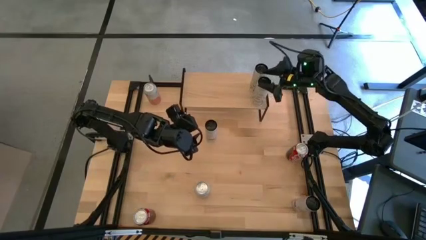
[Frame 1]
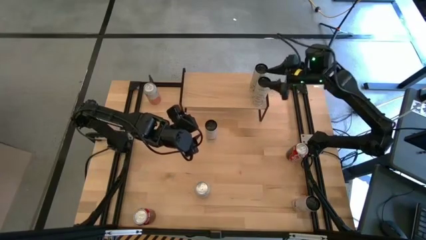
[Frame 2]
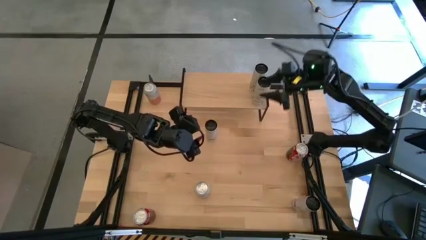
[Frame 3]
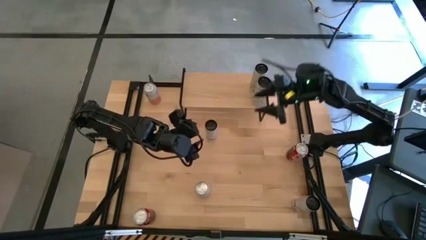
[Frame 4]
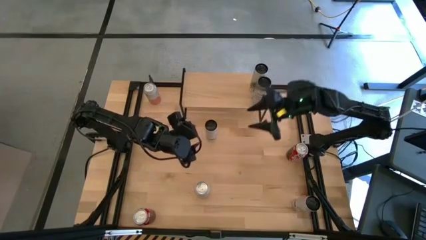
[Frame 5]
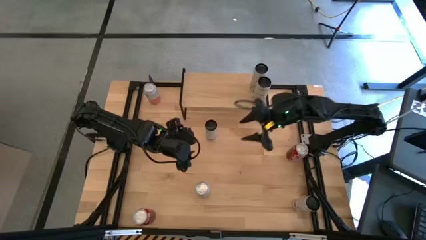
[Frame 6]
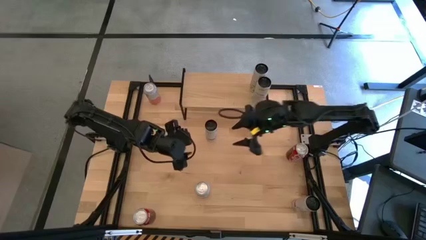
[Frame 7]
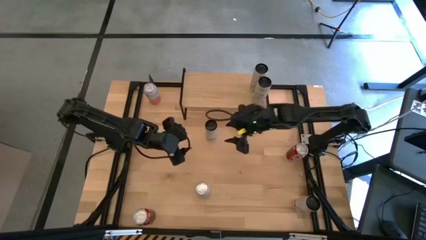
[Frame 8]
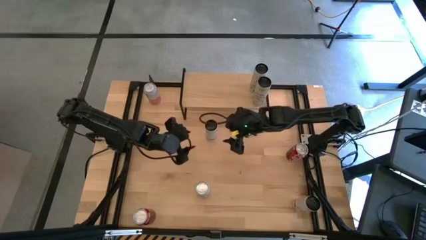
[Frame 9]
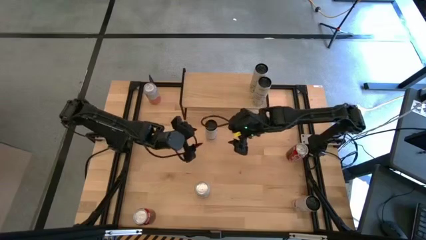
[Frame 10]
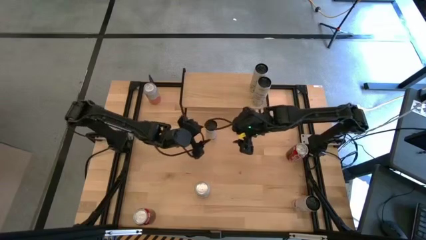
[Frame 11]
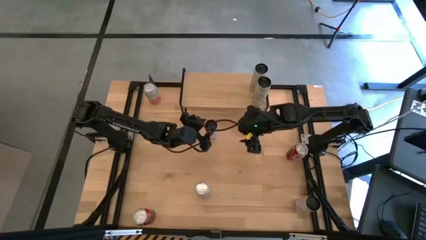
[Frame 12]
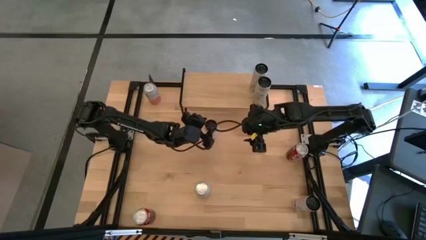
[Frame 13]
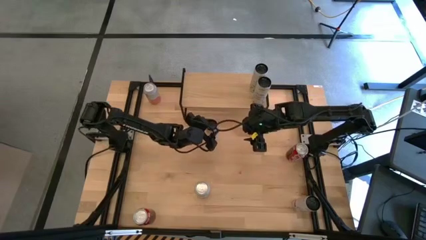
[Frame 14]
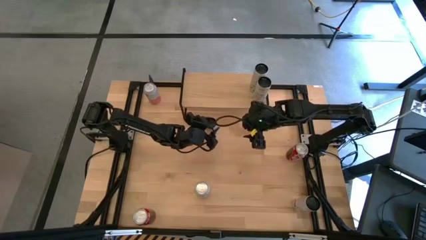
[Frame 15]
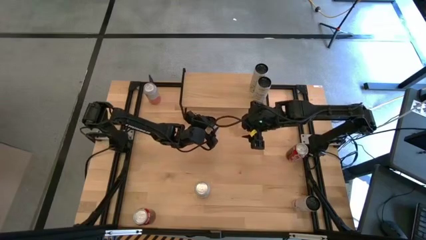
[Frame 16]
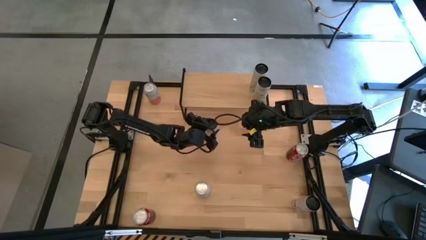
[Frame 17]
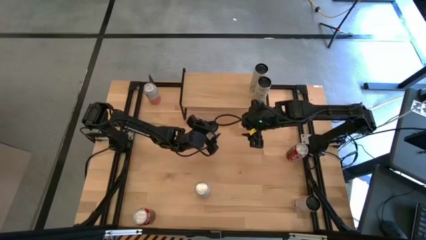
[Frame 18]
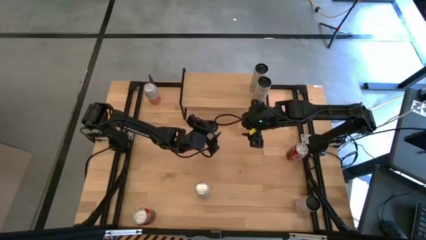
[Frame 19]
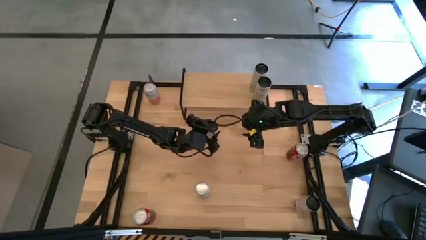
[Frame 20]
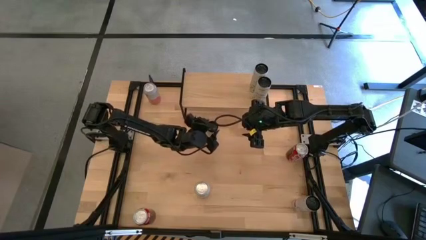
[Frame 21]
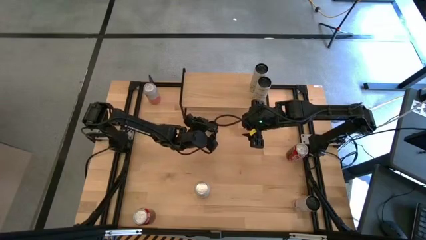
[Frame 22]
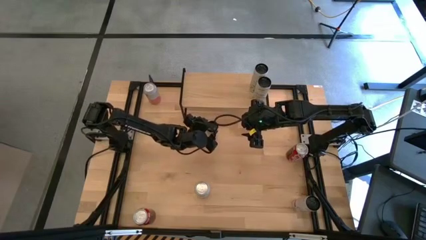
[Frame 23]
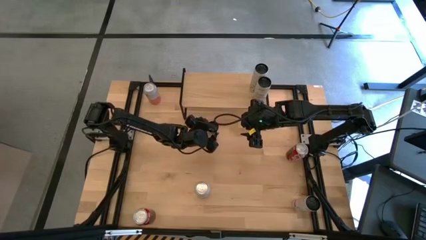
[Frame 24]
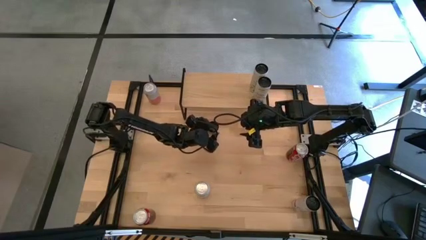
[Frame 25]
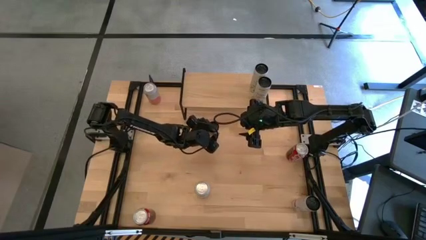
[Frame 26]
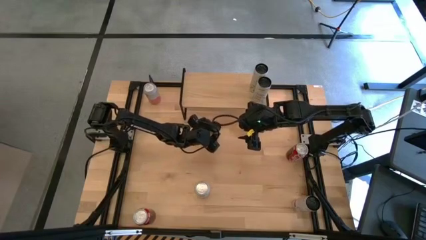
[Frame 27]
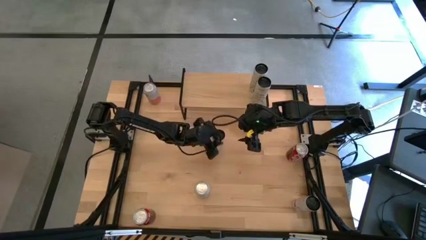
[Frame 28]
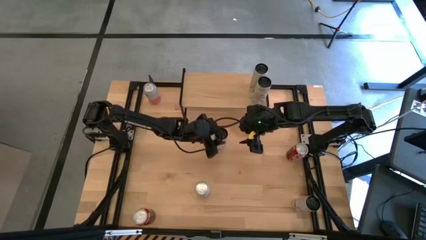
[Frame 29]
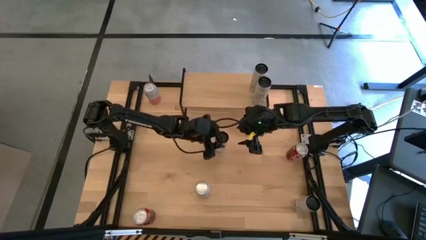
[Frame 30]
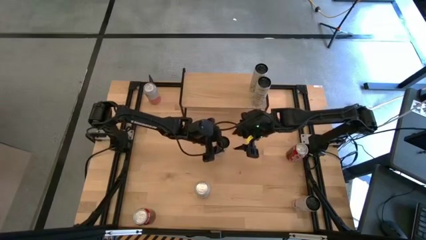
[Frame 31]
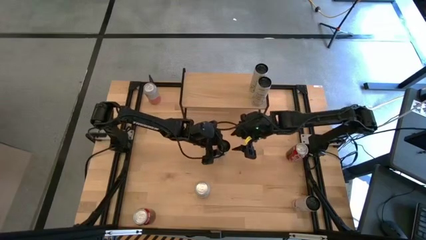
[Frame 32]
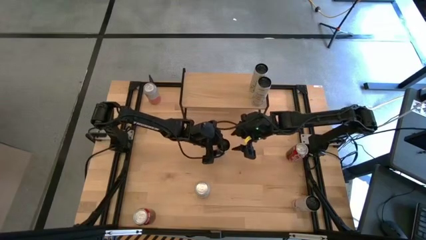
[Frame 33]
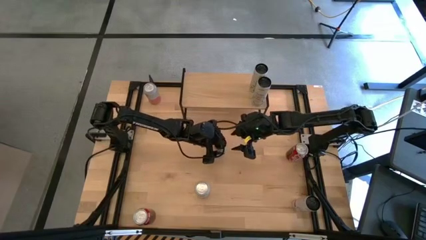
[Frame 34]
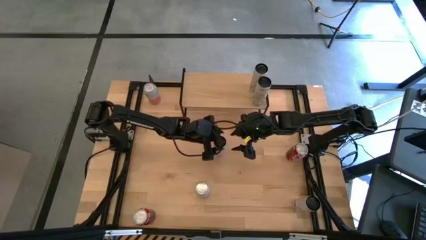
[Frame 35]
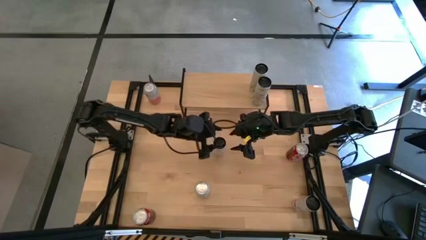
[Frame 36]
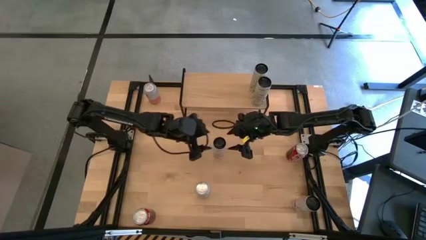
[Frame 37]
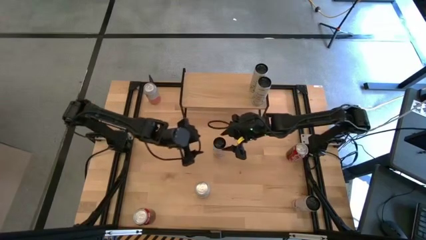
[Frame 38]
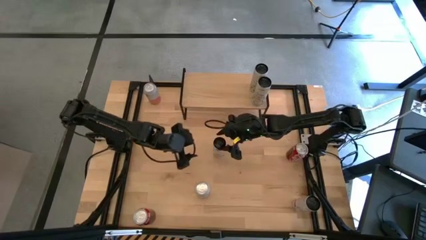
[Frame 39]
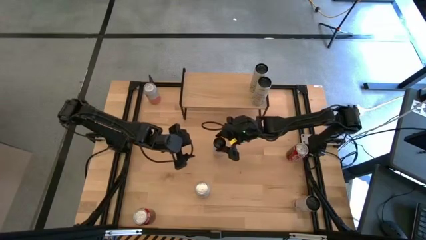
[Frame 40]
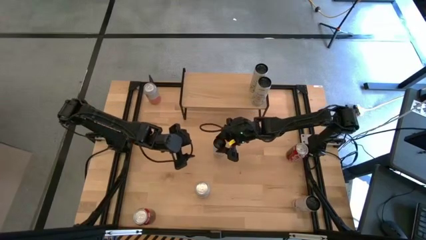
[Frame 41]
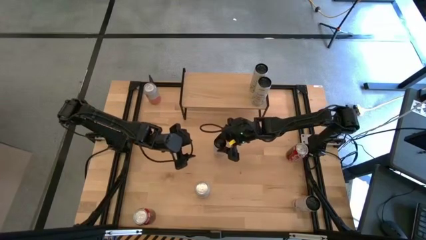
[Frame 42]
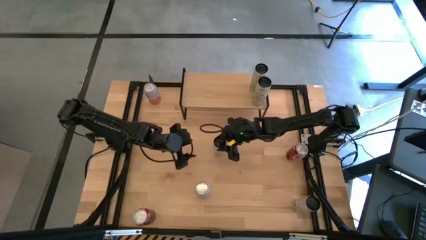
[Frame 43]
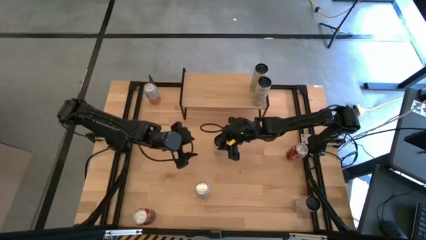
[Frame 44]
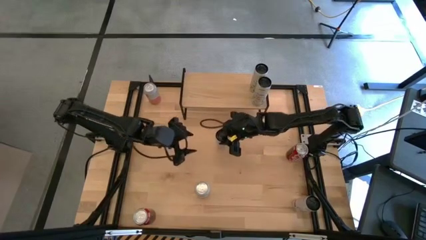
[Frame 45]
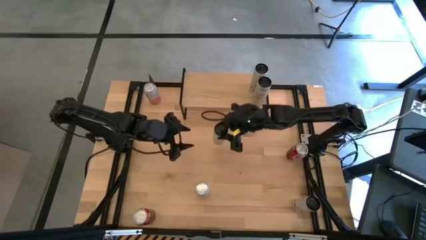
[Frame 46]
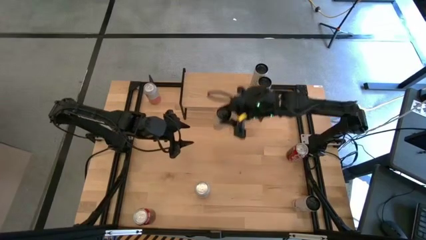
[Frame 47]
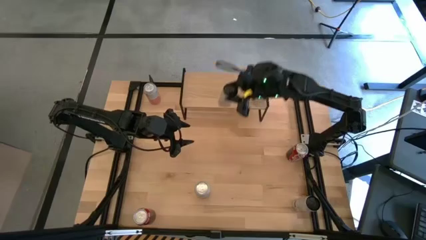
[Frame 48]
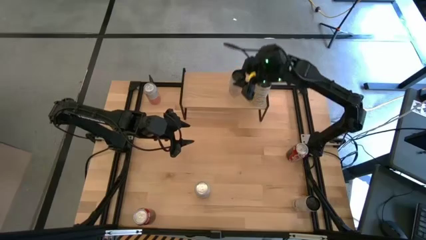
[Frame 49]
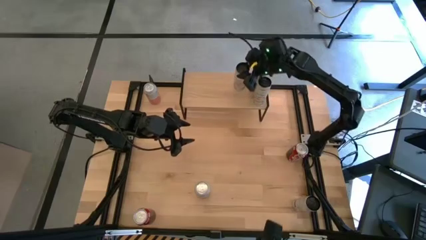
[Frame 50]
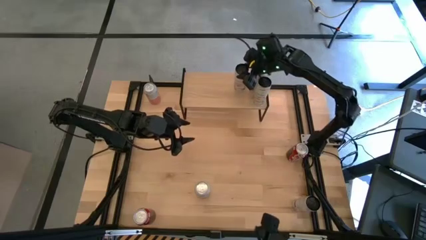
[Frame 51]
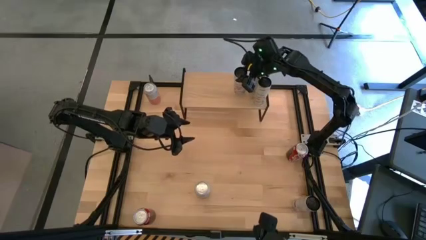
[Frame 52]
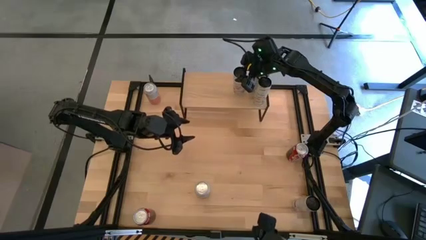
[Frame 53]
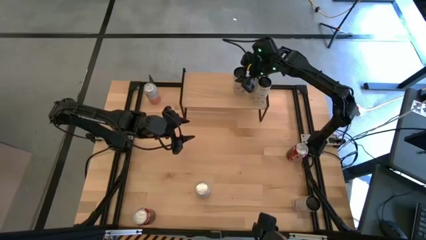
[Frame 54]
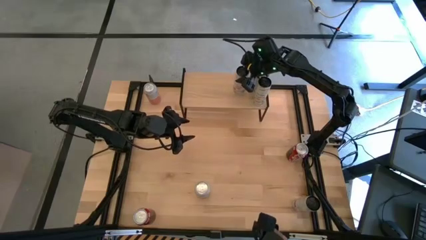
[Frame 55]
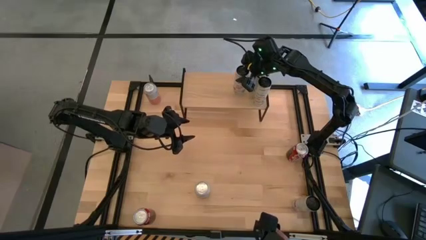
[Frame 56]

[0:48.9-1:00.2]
Task: Place canned beverage on shelf
Put the top white and pink soda can on the shelf

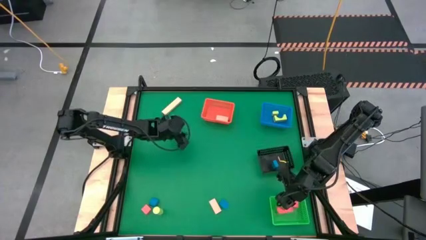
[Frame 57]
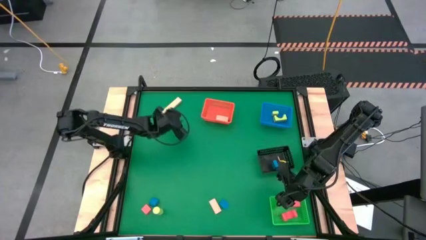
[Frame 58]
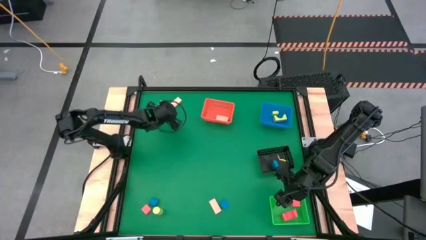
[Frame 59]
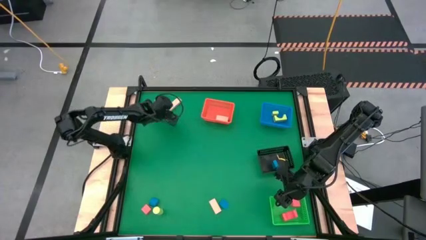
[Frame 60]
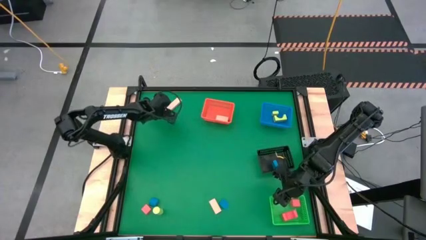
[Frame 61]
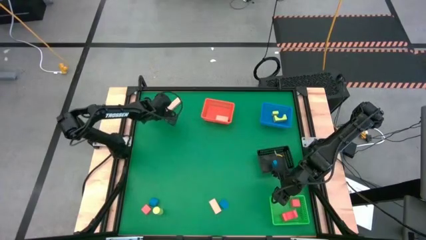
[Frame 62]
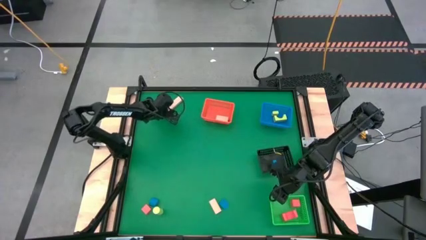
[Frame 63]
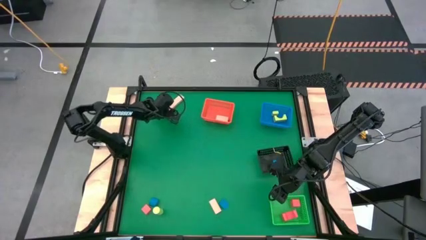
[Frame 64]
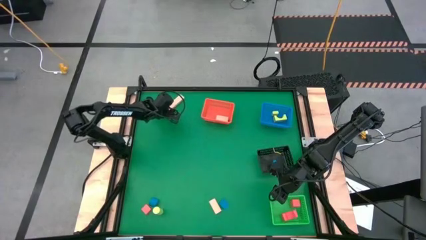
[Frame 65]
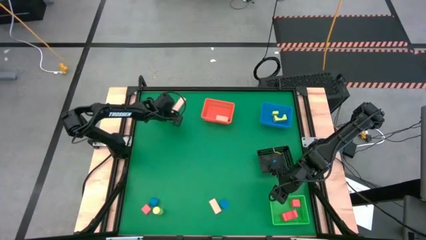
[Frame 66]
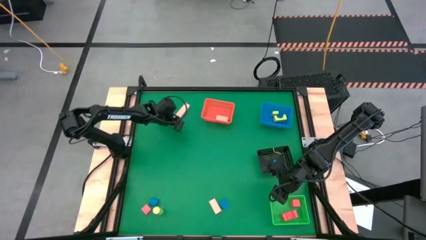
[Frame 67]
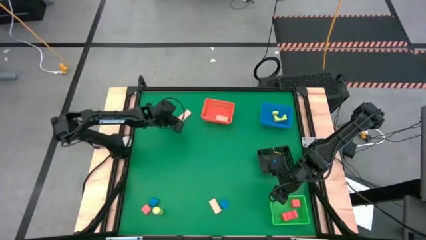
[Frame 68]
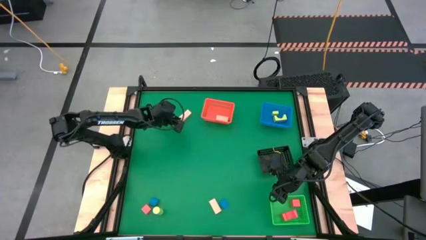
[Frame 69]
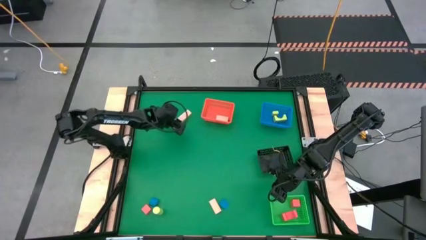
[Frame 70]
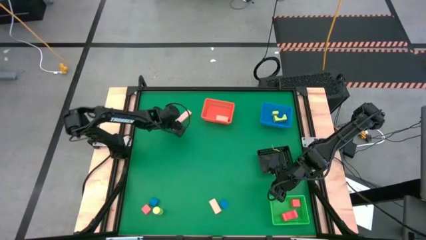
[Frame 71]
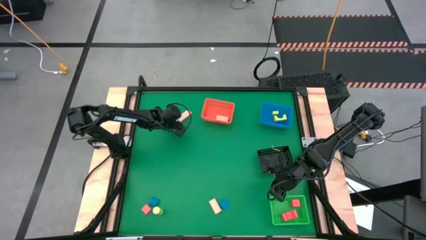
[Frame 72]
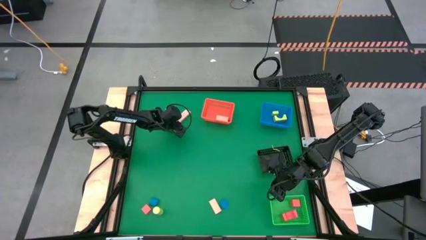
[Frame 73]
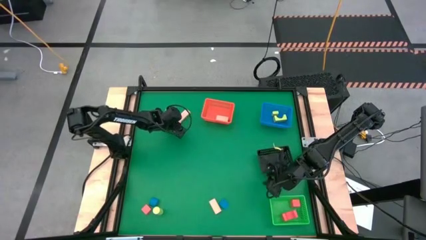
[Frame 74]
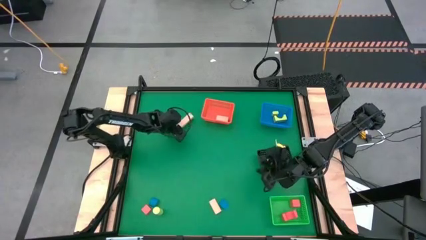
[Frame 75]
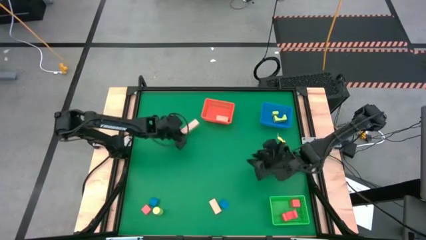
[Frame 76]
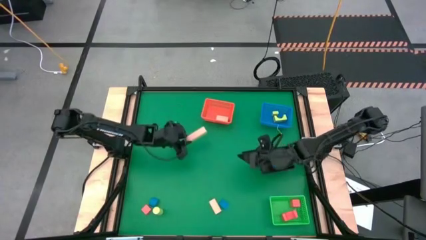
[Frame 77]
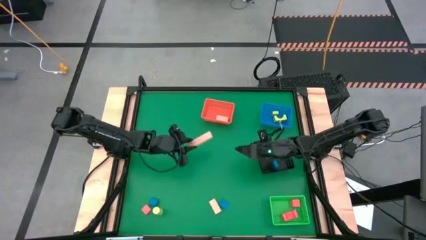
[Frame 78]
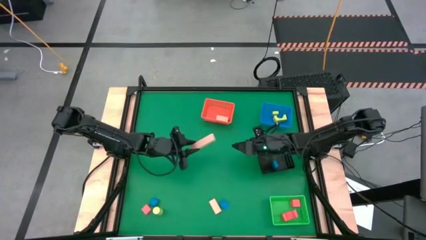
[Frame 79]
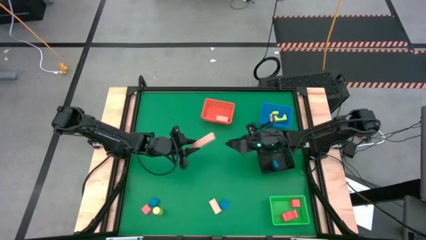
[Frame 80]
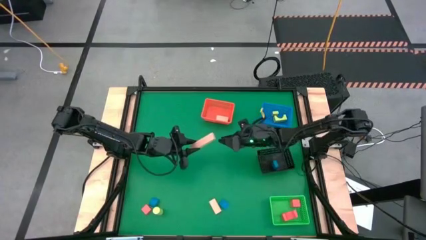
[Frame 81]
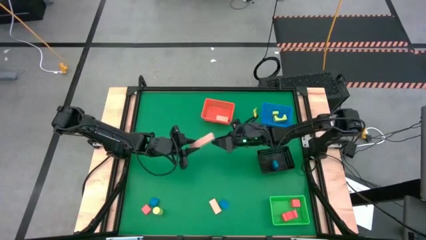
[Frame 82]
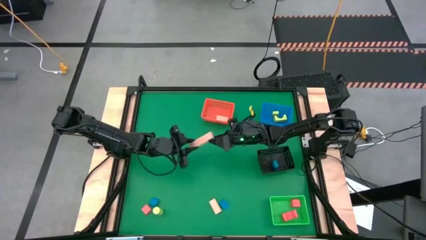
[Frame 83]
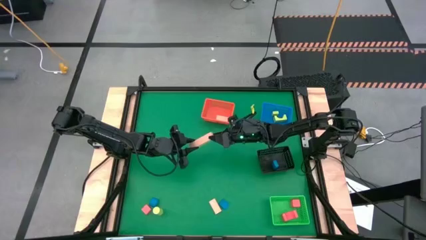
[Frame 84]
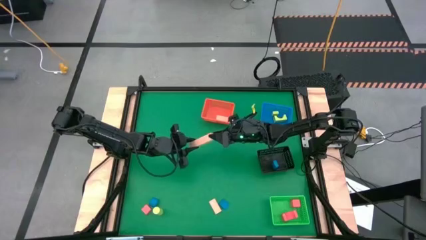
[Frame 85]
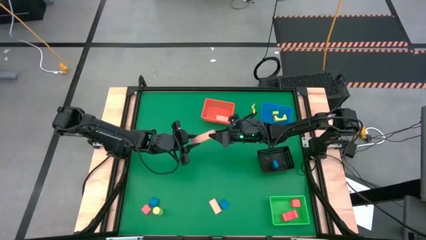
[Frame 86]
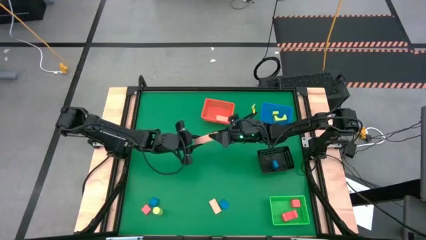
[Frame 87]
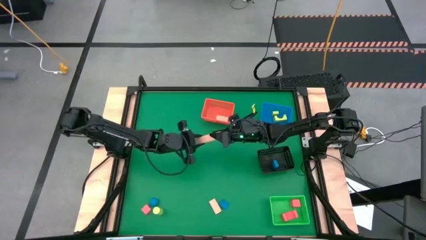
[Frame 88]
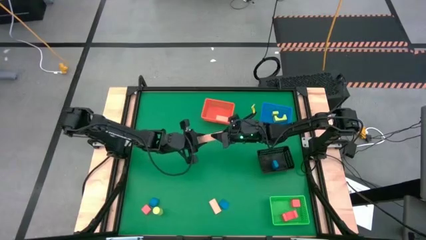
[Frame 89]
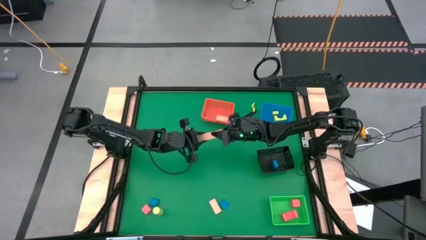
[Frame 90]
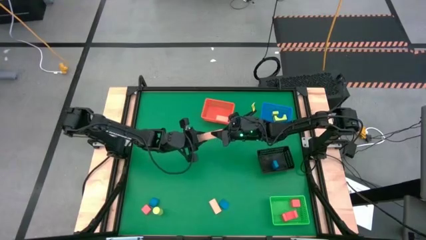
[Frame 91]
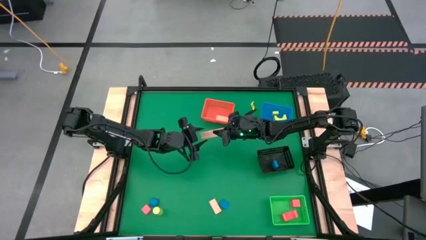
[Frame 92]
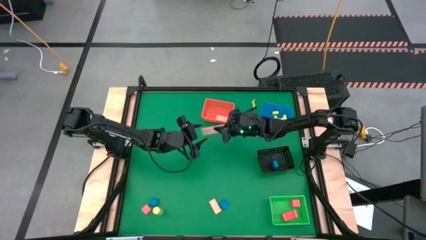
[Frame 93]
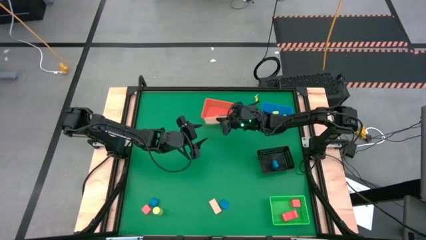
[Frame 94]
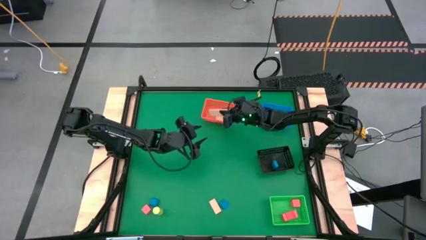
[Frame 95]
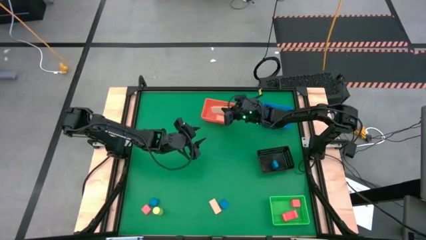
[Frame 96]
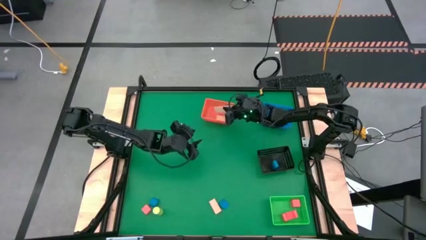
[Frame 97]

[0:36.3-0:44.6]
Task: Sort & place blocks by color
Put the brown block into the orange bin
